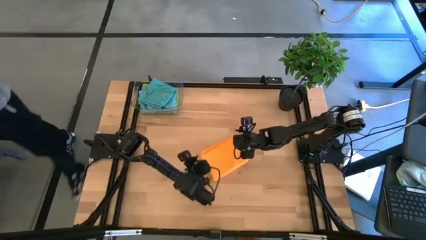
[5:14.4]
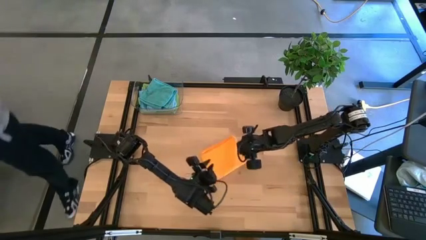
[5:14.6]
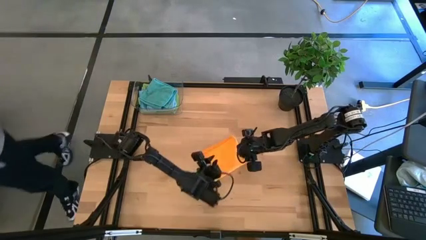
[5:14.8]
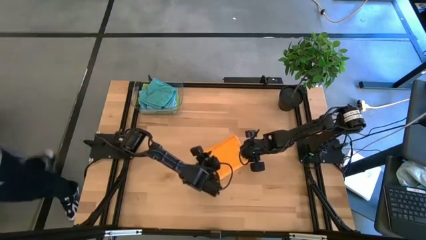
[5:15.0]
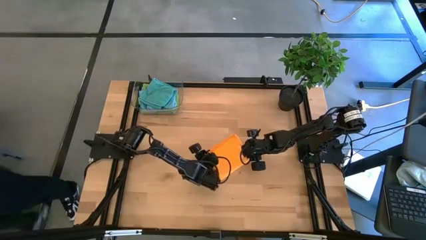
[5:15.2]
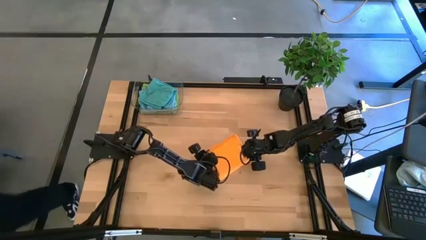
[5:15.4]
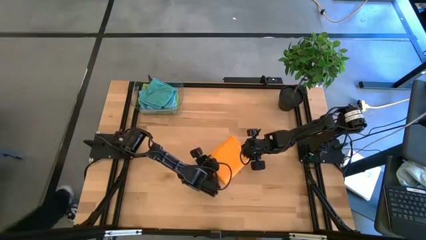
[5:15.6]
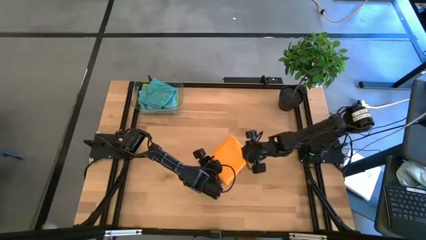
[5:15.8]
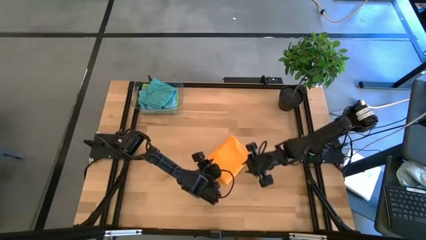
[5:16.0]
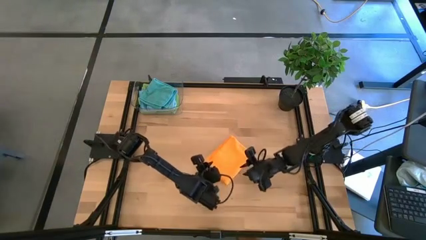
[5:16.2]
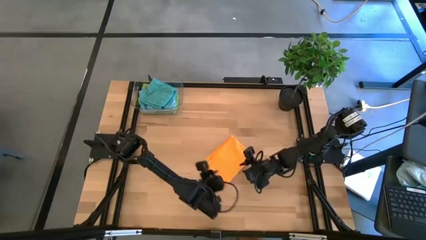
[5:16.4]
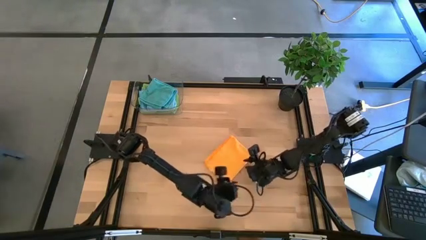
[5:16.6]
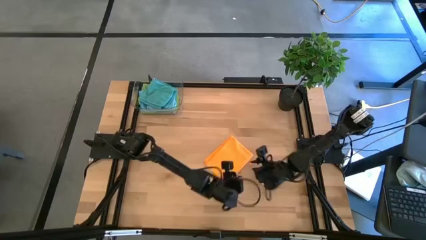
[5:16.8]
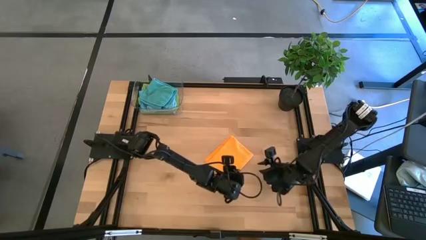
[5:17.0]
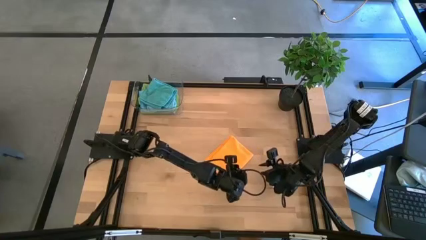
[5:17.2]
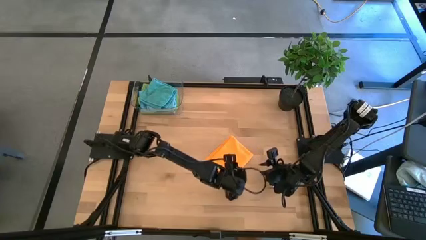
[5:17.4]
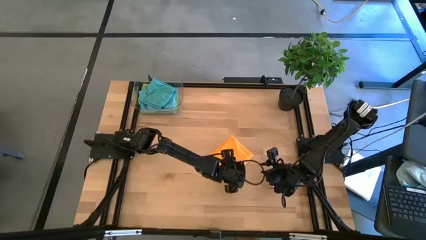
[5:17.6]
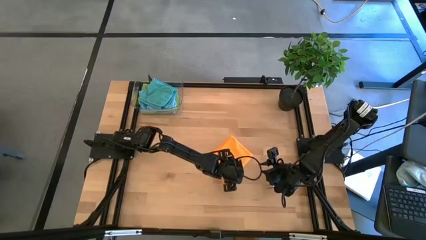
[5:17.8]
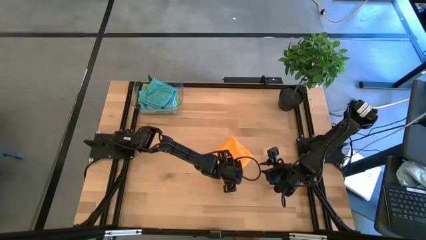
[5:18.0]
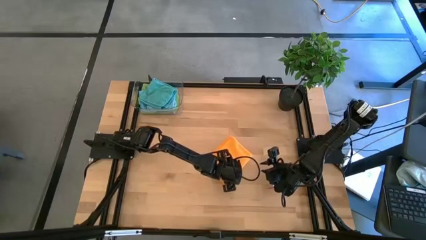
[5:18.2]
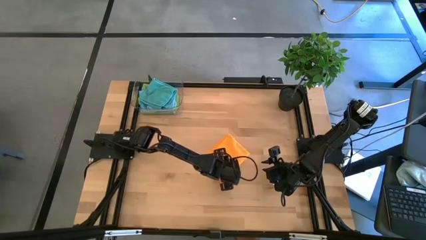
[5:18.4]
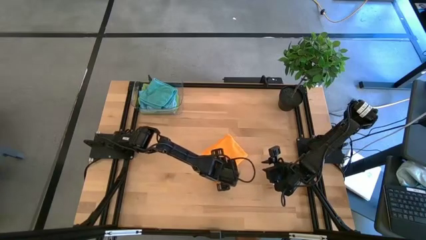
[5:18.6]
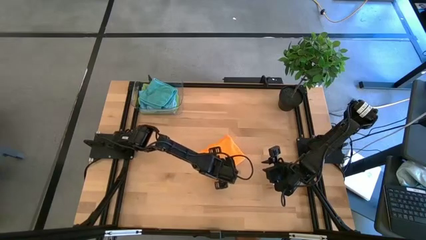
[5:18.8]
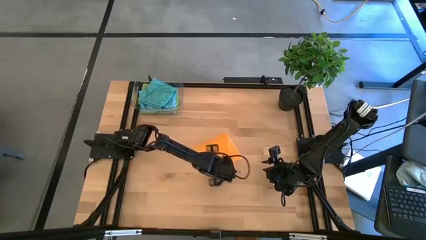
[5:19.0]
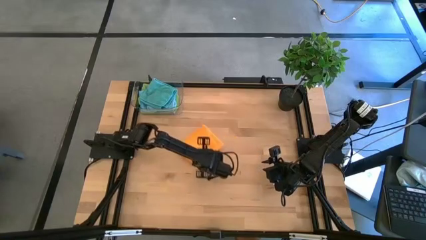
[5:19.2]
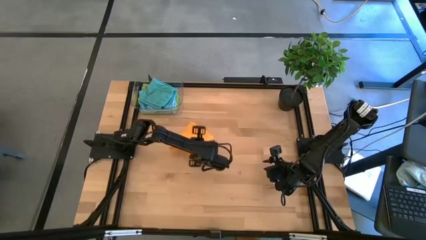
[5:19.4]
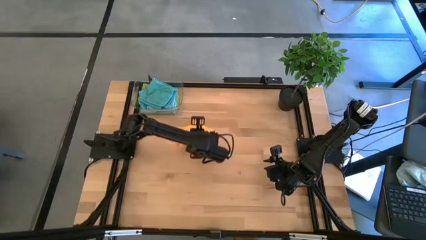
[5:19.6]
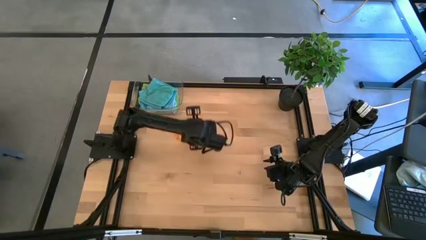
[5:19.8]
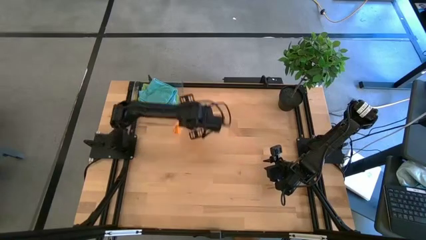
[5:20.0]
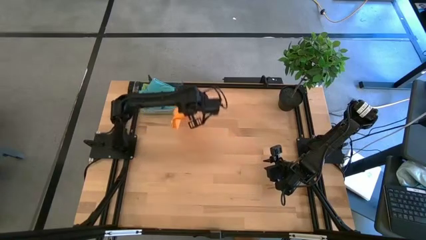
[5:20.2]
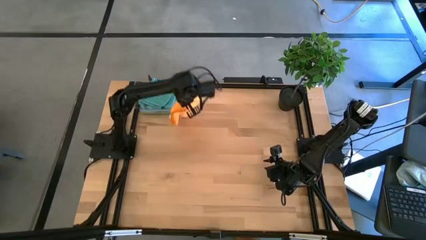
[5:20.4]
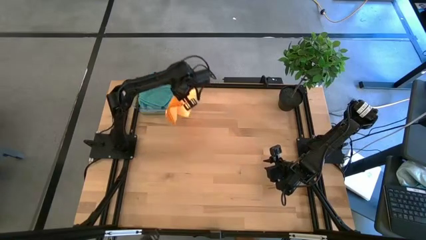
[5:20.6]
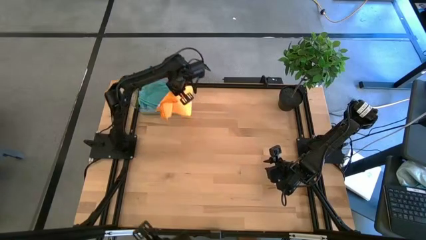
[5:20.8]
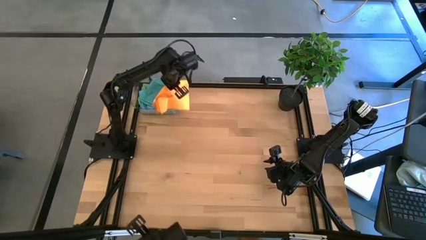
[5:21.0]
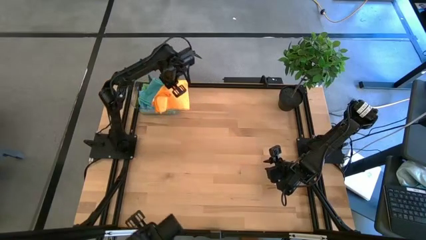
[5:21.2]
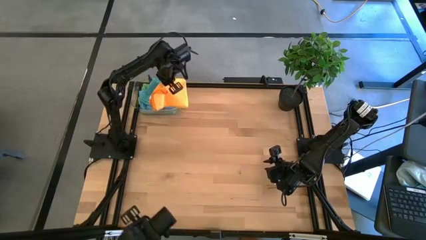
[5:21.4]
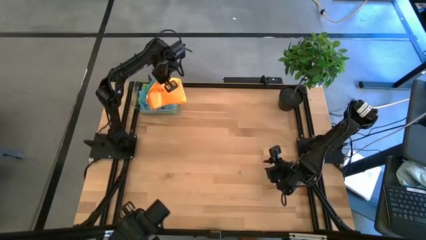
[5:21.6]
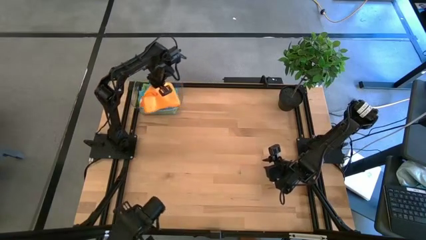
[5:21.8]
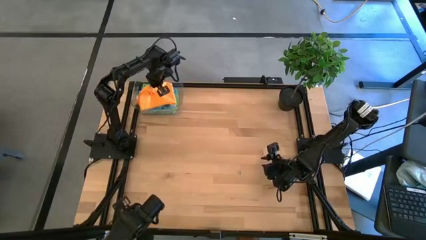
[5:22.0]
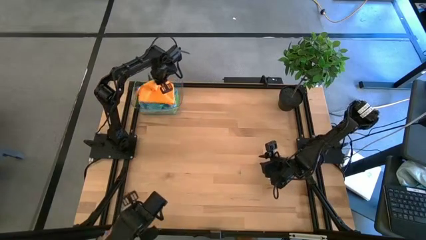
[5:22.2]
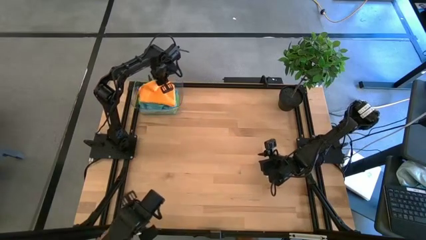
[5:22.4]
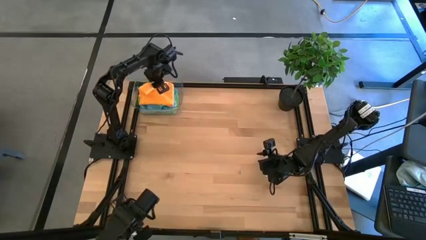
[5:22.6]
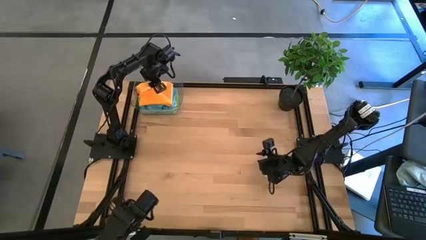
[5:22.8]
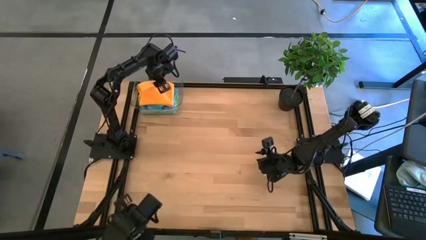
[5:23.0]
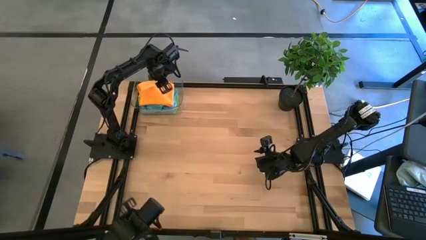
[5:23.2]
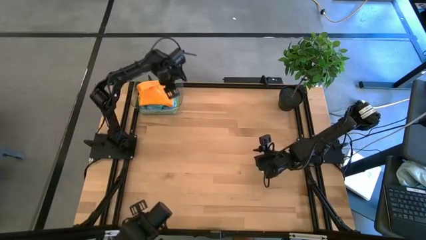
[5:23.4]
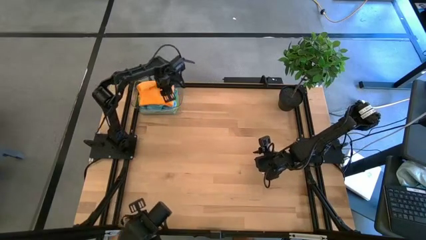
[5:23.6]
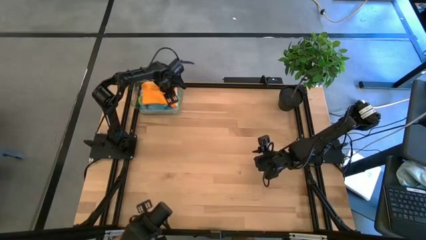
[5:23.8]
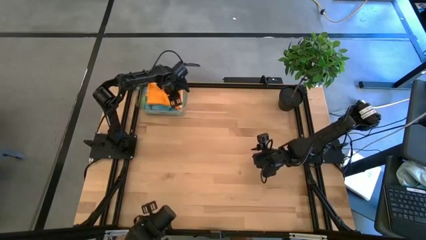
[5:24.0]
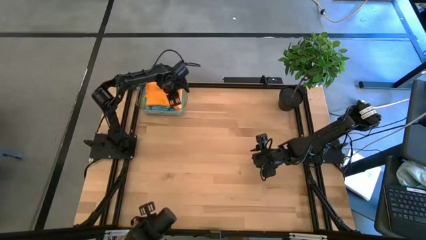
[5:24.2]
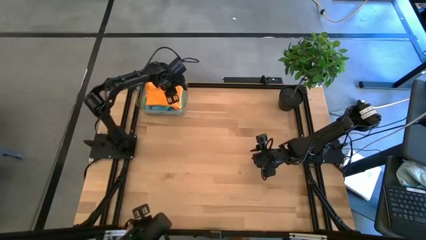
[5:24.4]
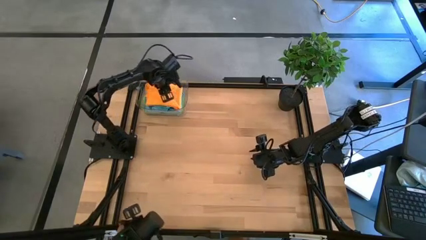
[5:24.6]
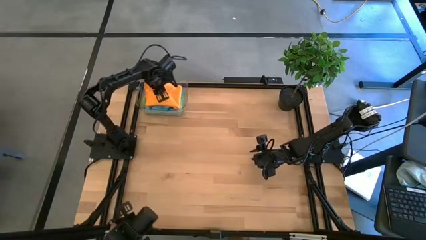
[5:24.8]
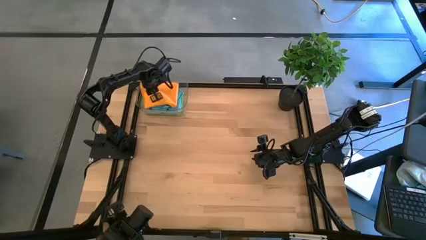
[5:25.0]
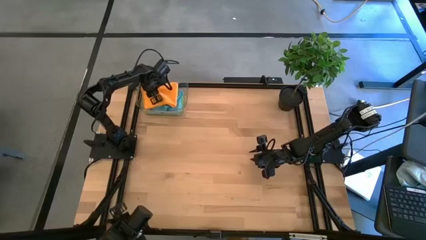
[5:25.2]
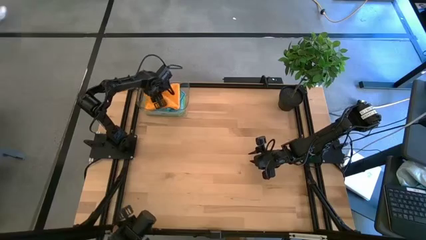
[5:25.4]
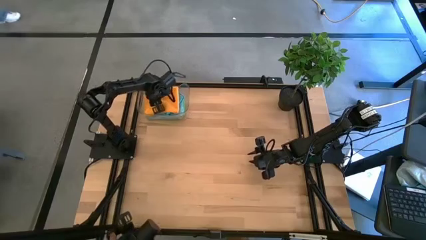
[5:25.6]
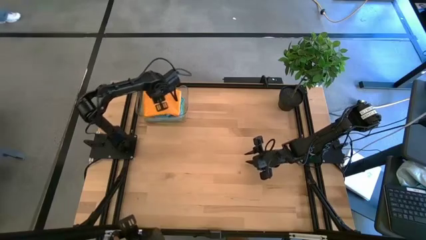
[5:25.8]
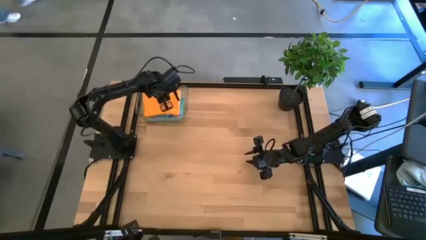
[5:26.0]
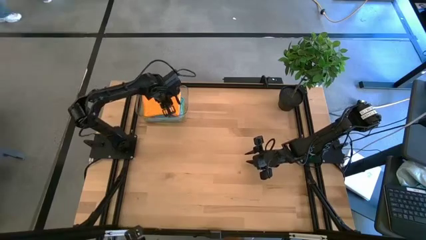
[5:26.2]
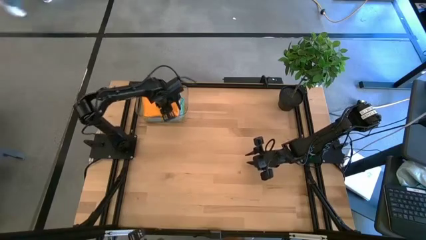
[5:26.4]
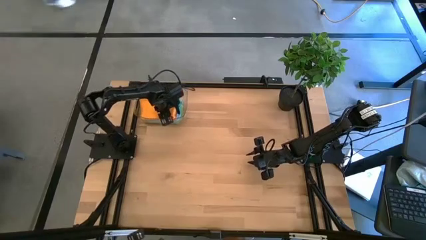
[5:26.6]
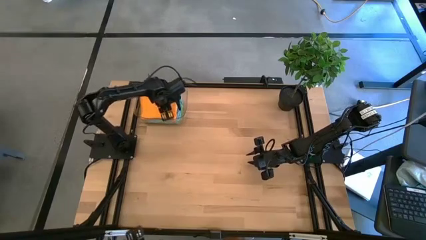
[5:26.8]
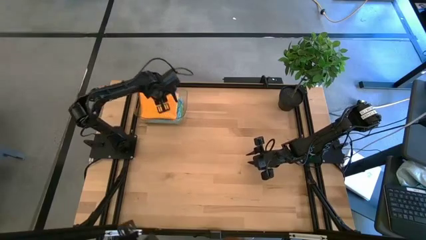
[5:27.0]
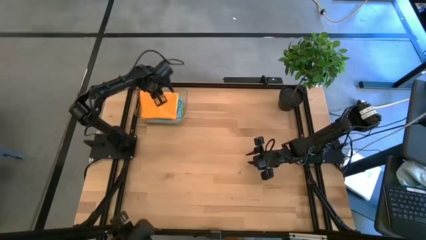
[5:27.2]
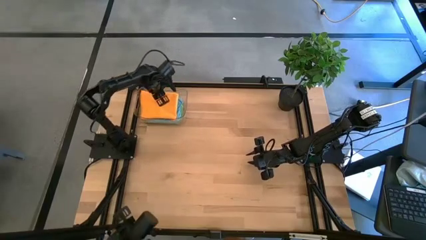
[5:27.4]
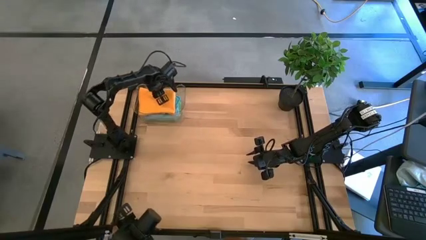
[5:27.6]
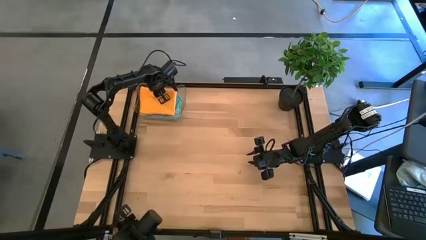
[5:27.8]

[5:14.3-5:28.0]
Task: Fold microfiber towels
Stack the orange microfiber cloth on top of the blue microfiber cloth in the transparent bin

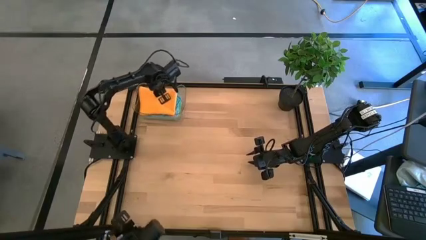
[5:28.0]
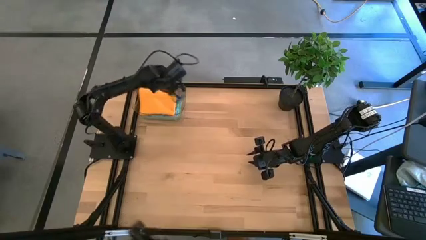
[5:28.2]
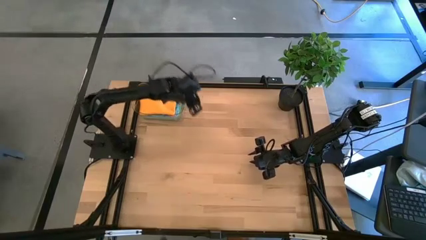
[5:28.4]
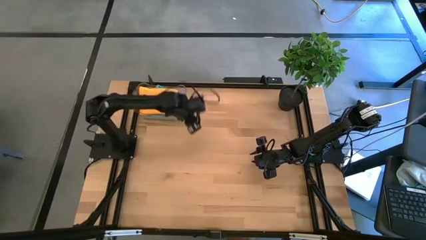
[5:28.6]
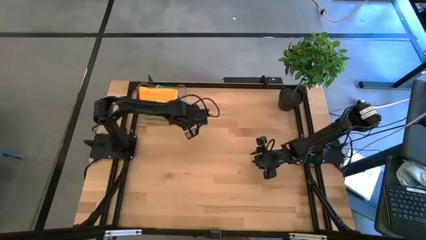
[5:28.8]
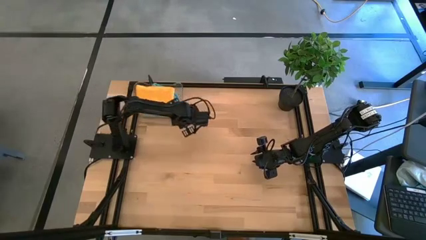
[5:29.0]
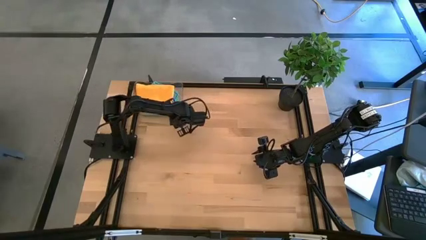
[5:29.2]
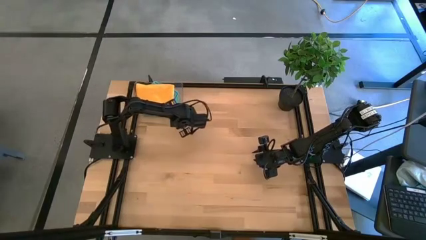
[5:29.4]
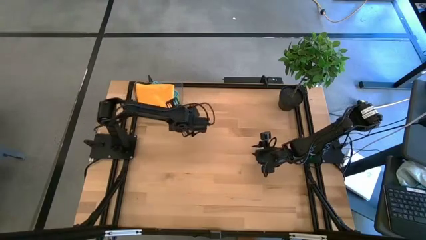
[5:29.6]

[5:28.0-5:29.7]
Adjust the transparent bin

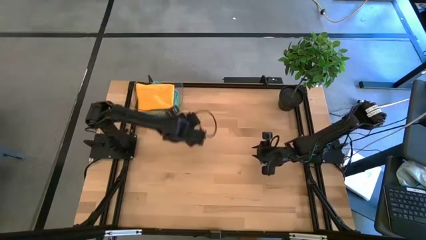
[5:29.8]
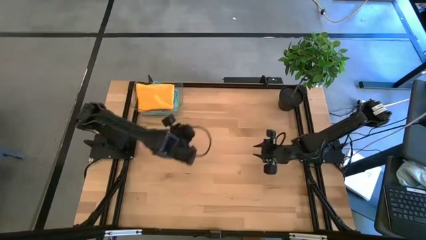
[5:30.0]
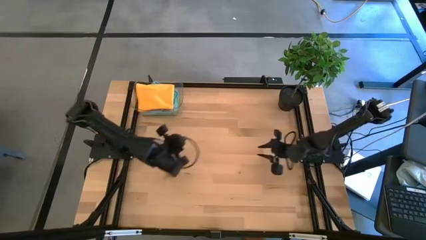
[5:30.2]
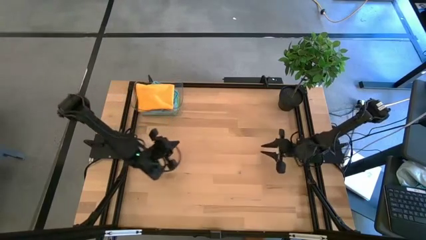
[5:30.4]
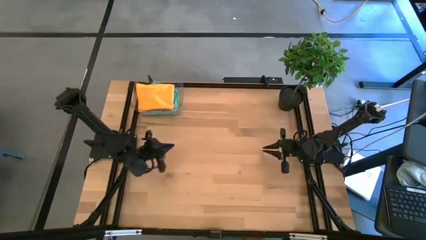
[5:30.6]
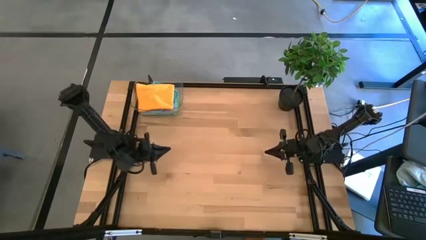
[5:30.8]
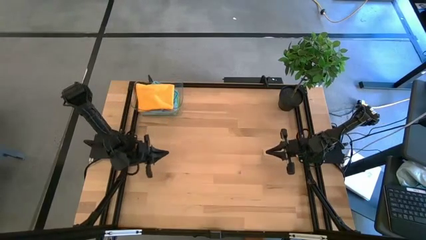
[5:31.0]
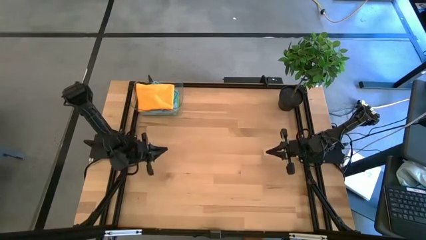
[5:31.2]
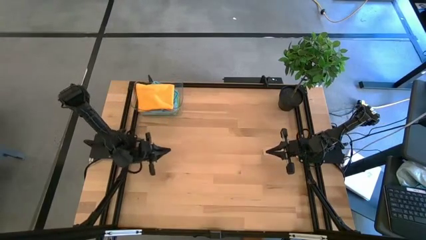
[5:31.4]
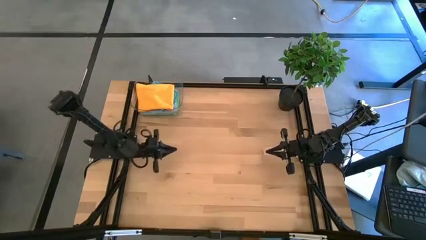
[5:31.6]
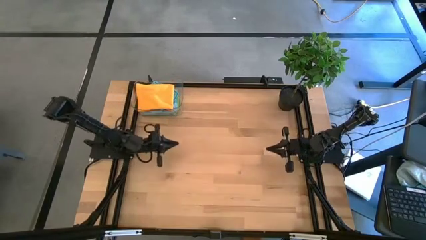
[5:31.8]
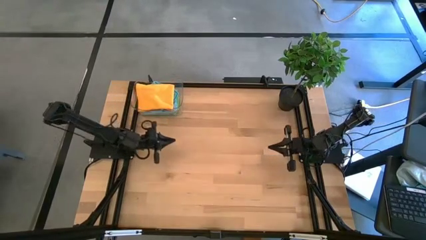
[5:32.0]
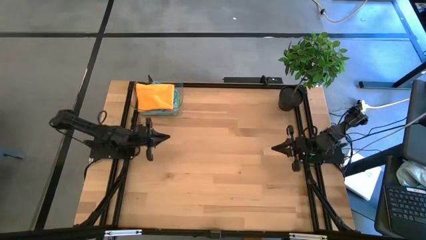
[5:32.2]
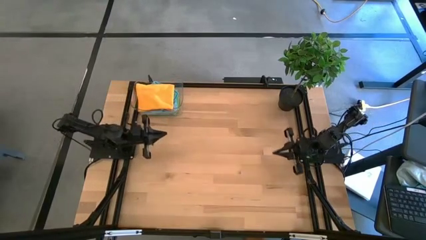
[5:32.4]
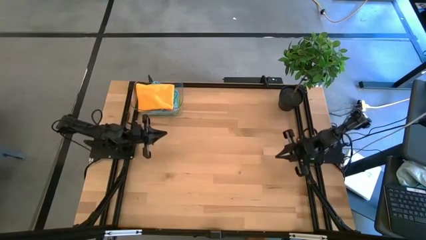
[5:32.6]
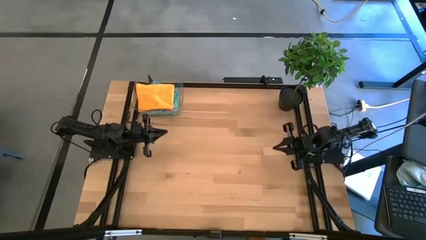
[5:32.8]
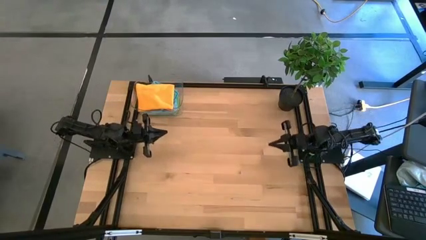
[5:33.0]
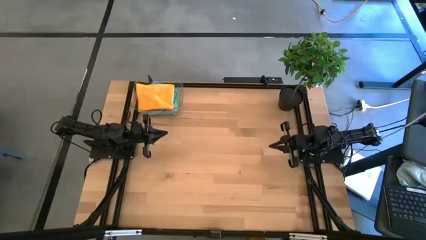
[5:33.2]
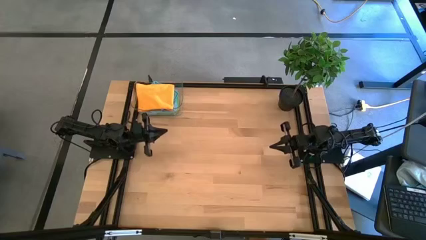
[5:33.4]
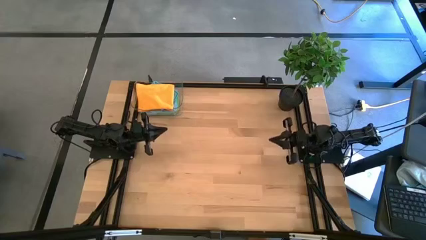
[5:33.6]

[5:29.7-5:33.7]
Return to Home Position
